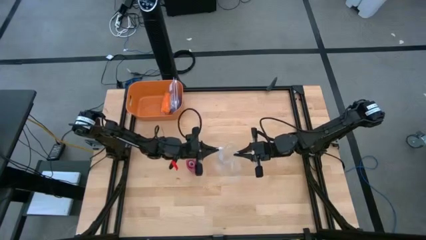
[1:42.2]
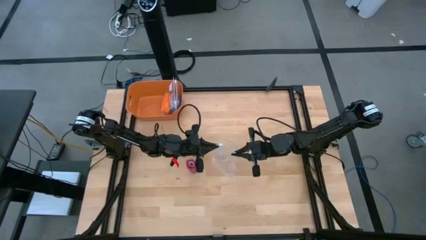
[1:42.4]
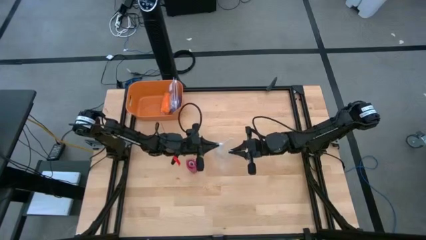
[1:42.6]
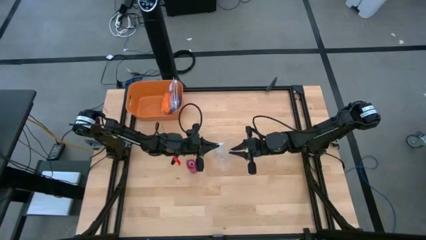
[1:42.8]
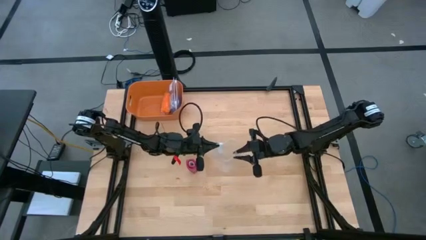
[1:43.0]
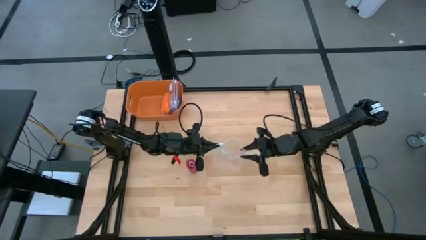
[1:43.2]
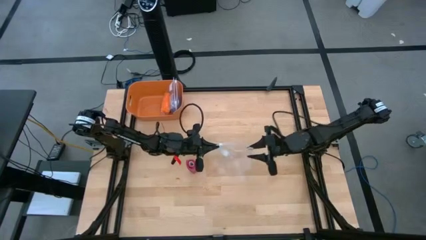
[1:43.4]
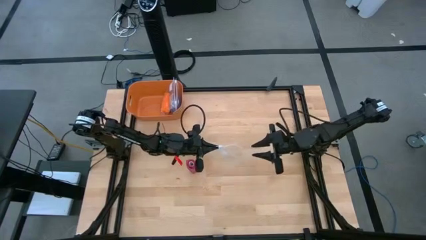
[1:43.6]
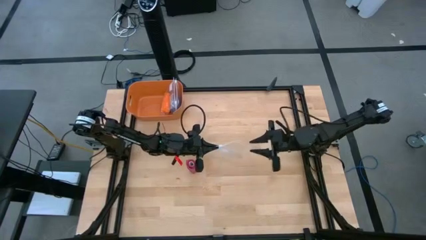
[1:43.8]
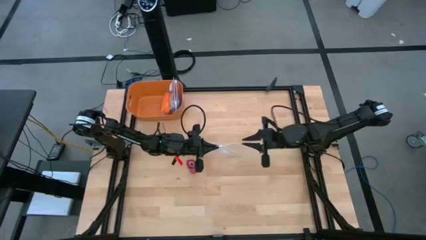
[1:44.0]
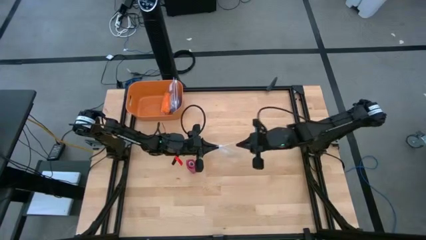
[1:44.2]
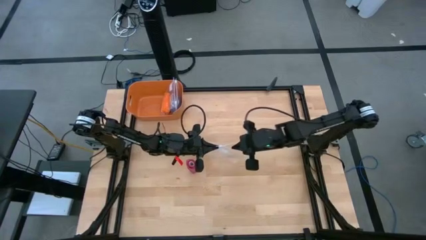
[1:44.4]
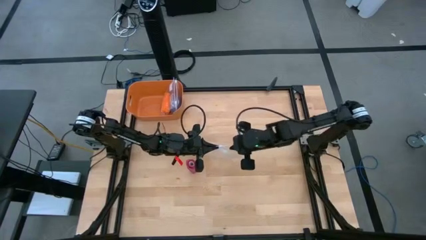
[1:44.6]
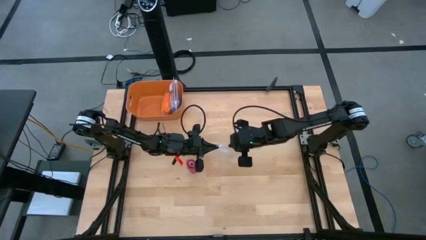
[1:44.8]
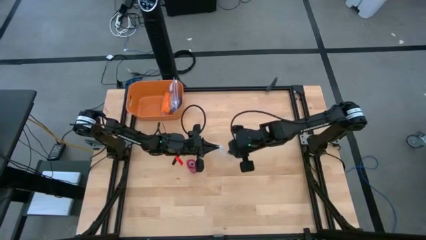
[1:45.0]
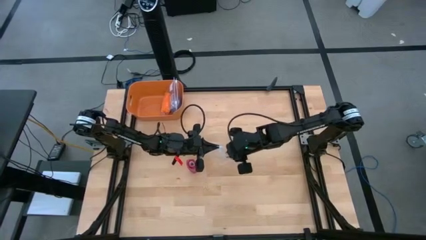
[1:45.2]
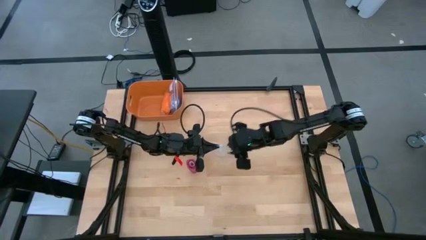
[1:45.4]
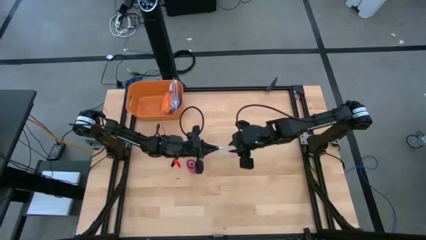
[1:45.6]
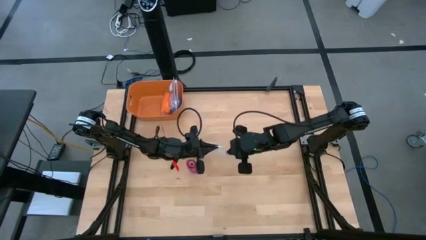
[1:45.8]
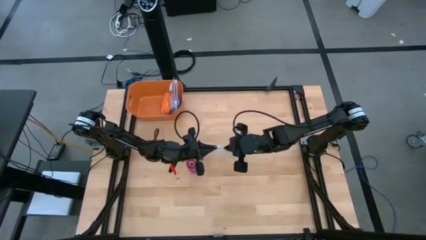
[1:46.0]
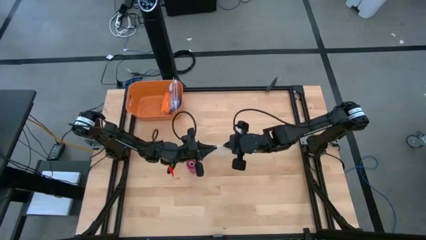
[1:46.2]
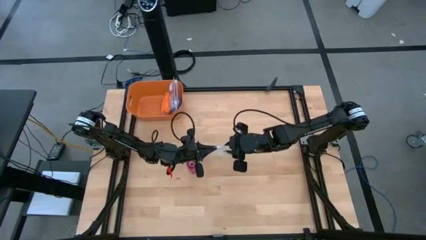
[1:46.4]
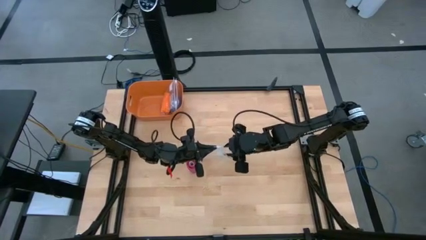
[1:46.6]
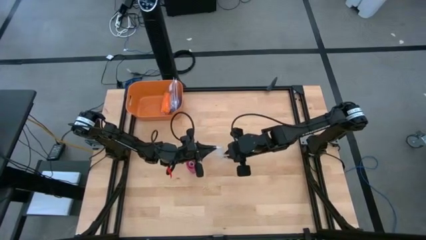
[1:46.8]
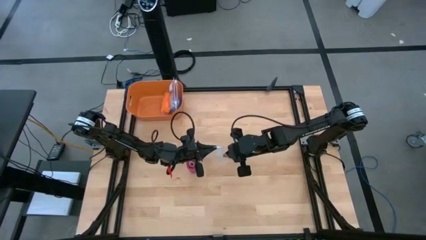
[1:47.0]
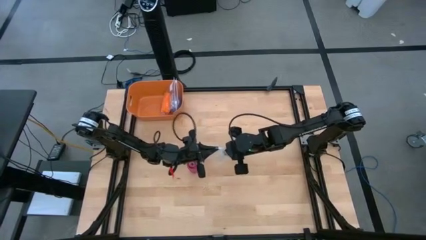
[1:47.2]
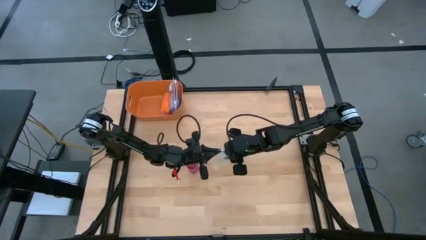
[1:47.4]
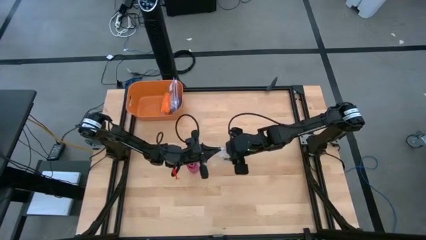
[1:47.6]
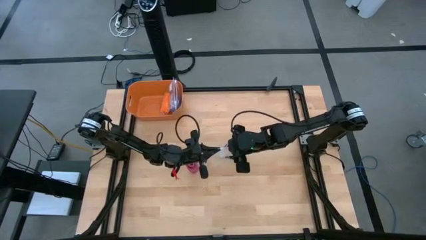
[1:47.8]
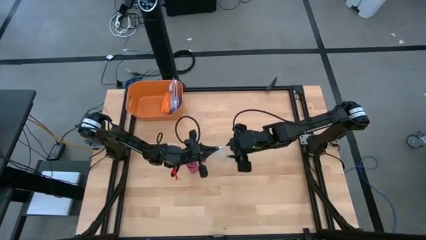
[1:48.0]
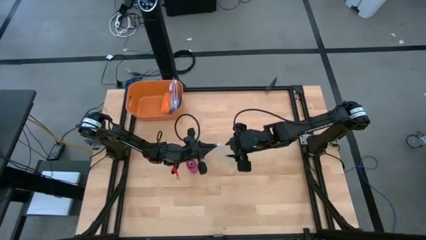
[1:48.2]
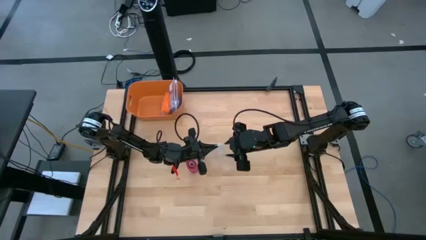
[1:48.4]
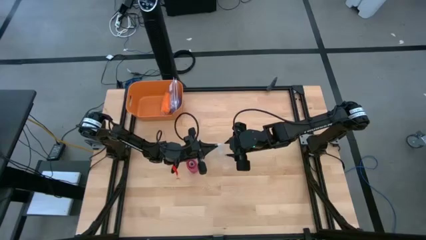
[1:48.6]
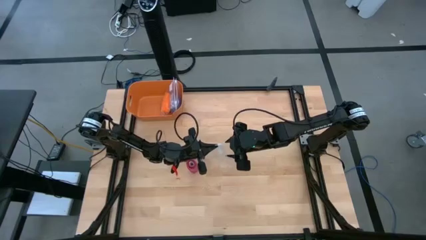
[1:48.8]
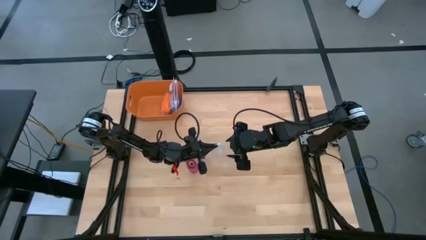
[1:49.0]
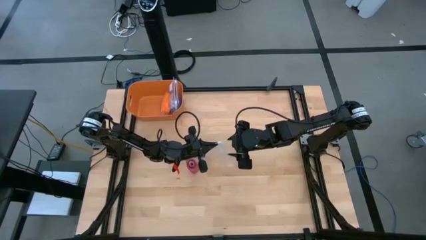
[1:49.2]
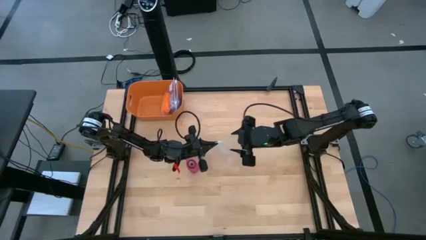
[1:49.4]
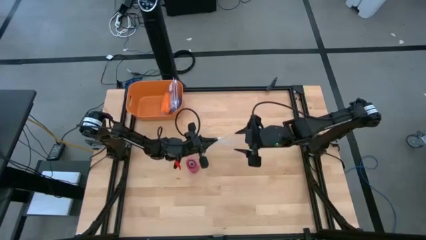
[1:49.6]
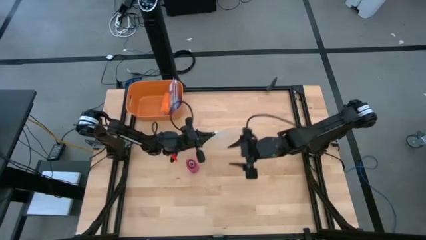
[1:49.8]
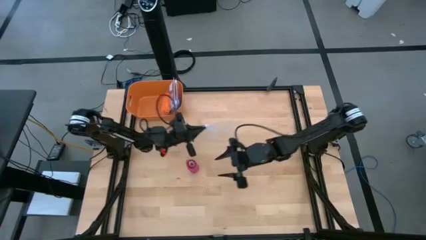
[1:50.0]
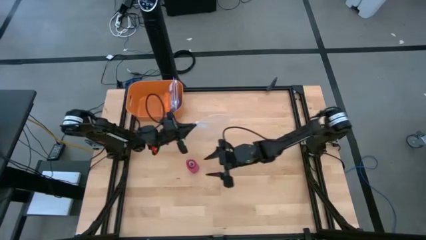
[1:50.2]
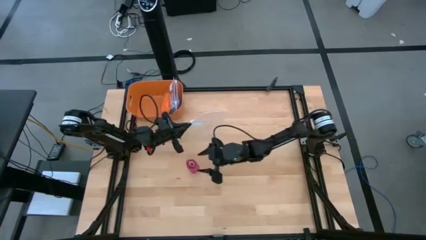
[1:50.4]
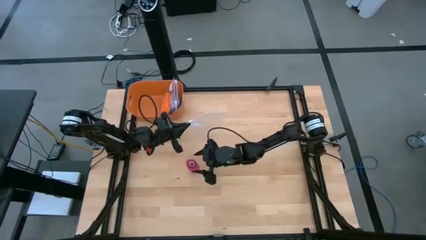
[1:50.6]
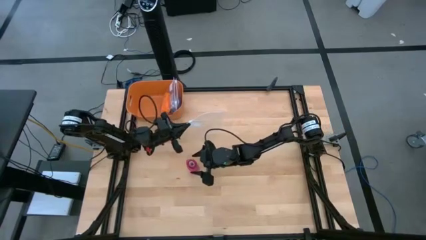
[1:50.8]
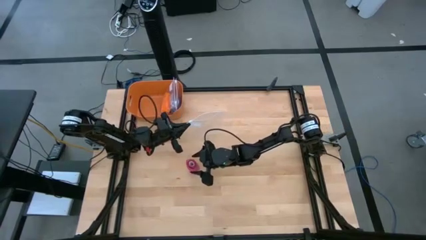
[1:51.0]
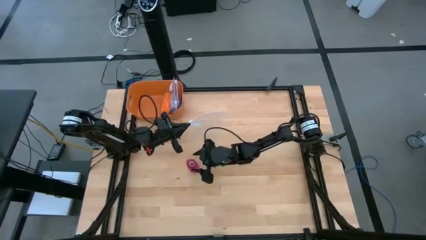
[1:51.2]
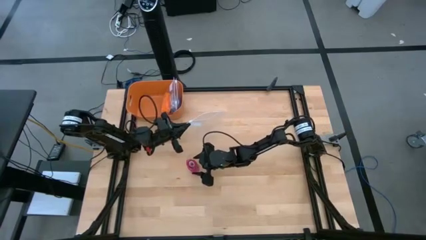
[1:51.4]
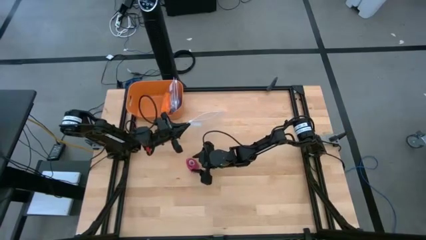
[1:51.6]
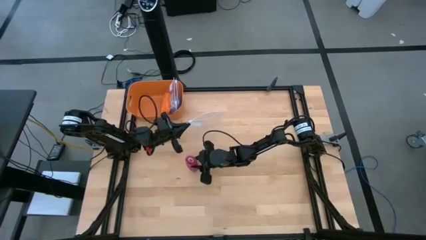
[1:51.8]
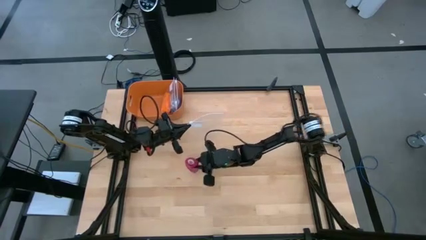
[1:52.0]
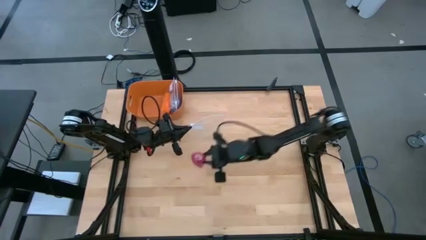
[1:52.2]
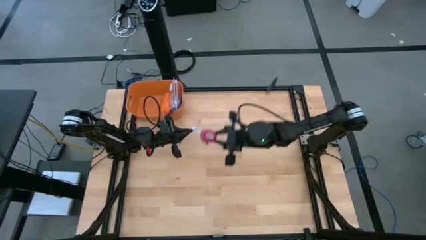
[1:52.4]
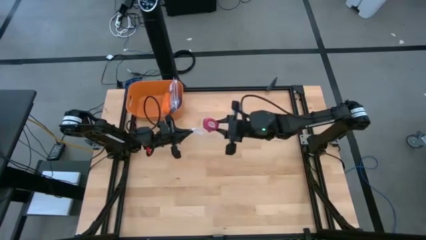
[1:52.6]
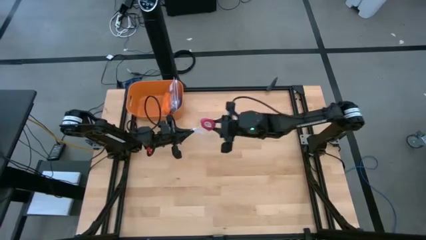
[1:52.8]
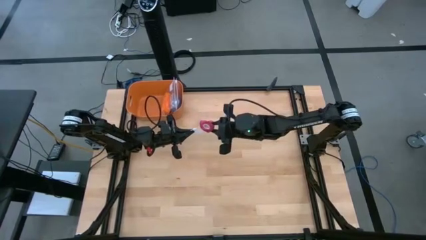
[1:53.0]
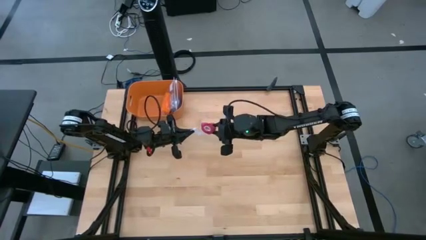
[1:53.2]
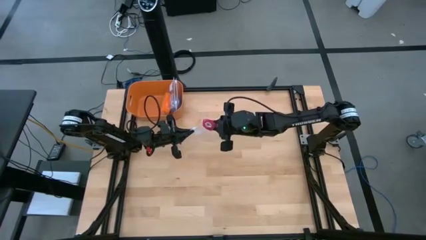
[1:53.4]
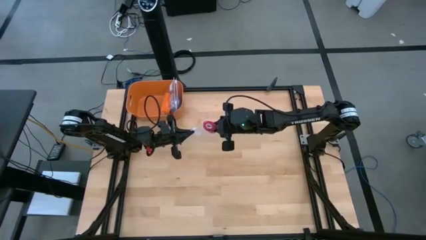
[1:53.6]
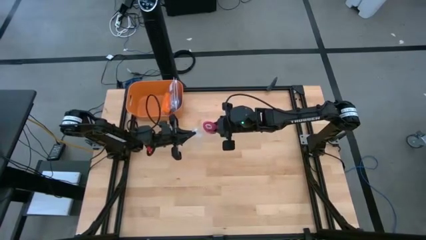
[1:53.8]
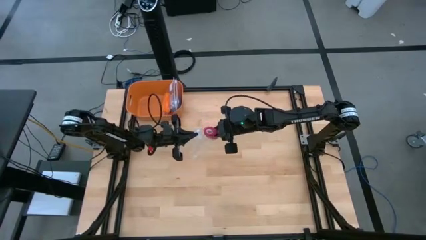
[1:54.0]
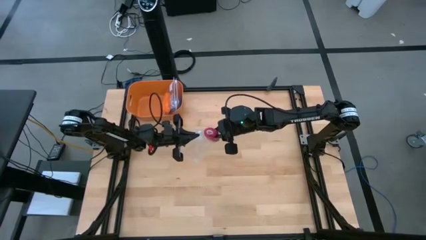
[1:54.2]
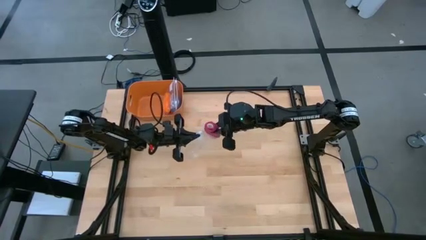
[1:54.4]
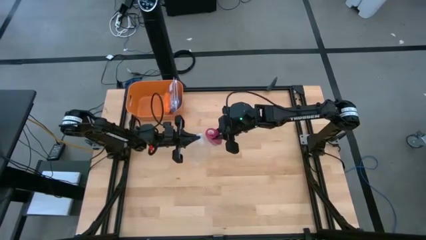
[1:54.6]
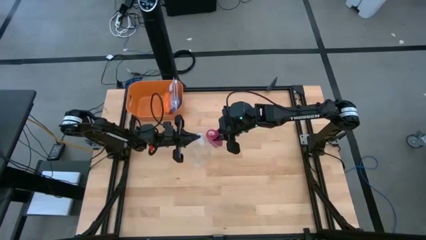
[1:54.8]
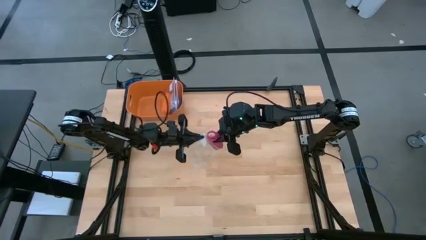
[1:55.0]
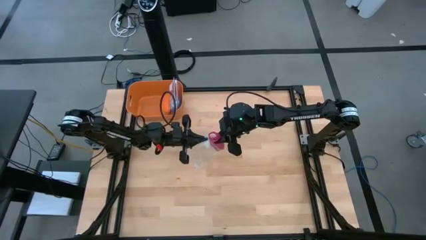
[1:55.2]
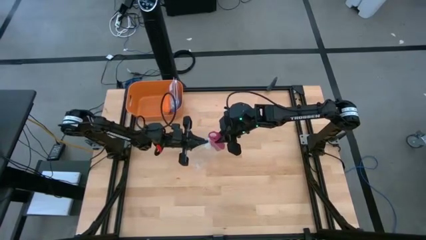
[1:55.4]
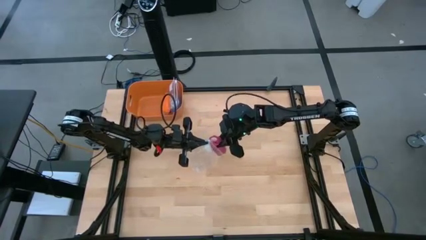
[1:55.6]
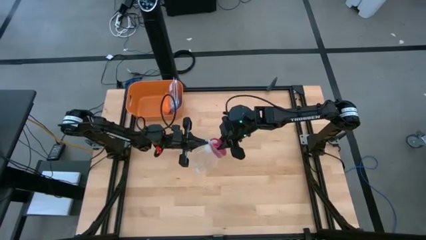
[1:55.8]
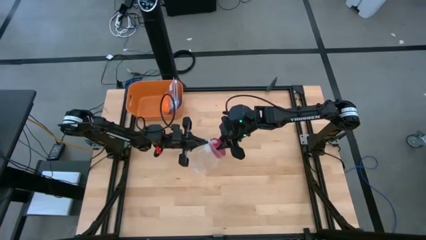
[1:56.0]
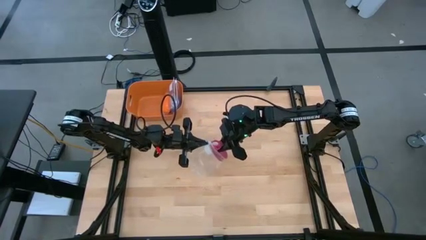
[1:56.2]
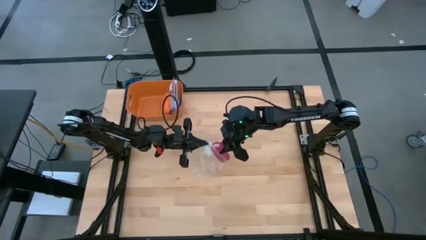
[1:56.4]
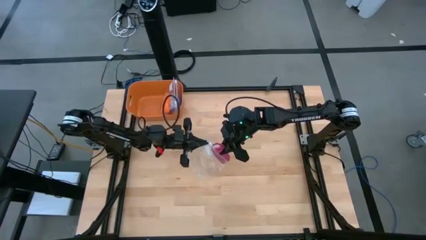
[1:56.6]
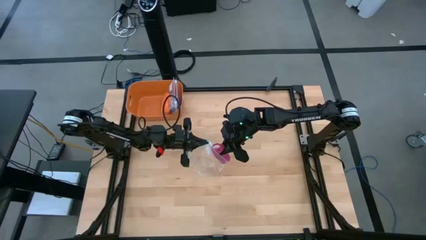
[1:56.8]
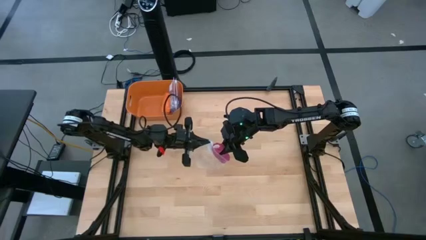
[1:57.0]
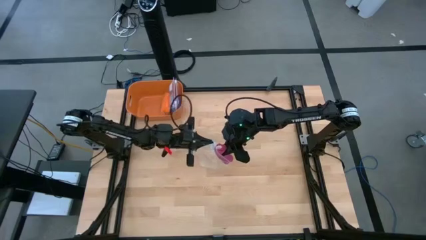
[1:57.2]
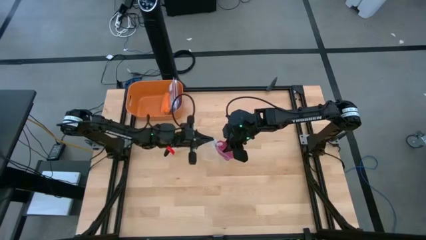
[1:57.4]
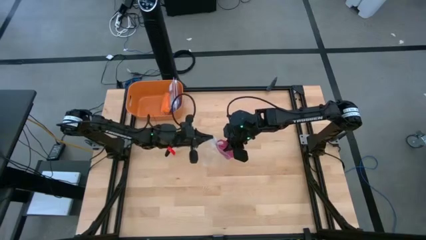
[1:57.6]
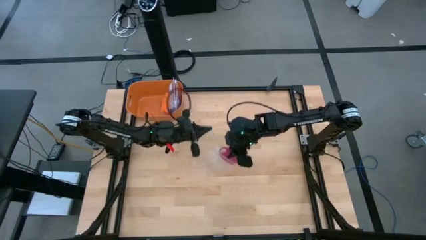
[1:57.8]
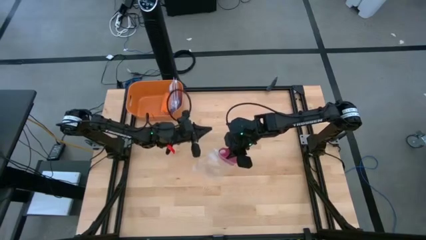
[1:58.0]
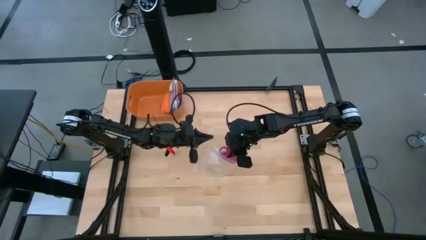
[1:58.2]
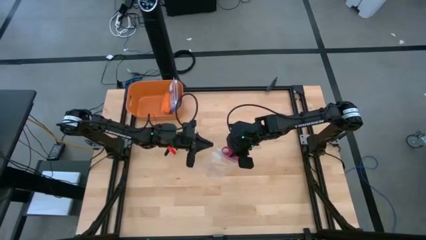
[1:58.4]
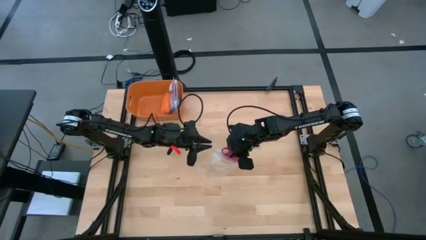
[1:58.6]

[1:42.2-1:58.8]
Task: Roll bandage
Put the pink bandage into the transparent zip bag
